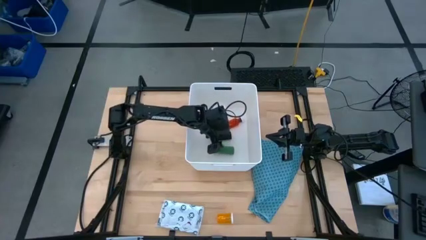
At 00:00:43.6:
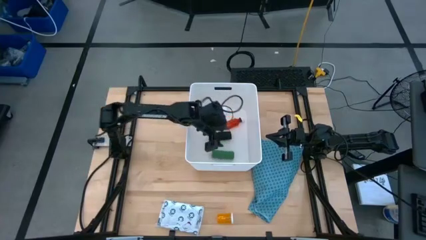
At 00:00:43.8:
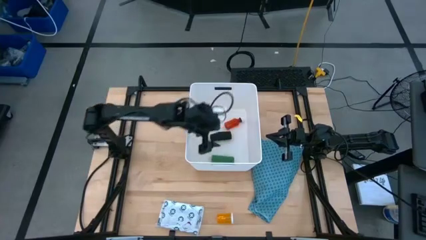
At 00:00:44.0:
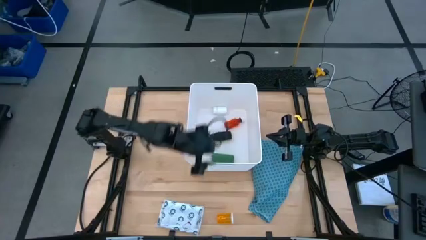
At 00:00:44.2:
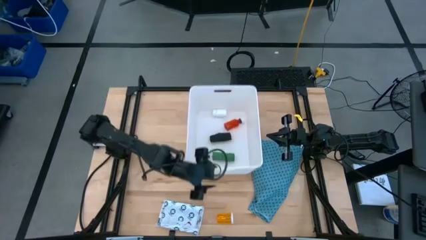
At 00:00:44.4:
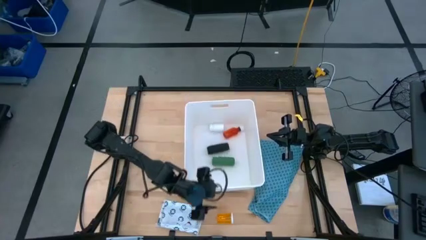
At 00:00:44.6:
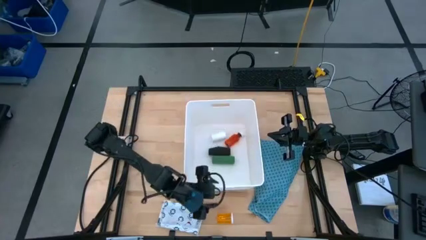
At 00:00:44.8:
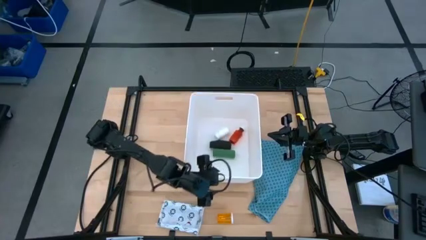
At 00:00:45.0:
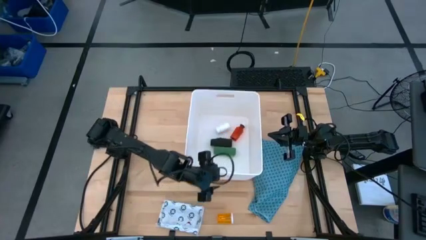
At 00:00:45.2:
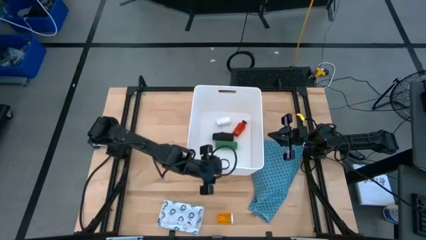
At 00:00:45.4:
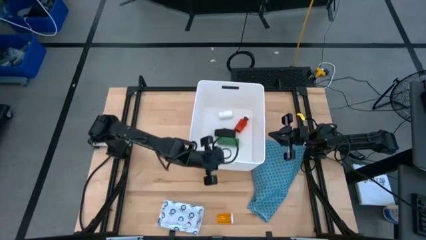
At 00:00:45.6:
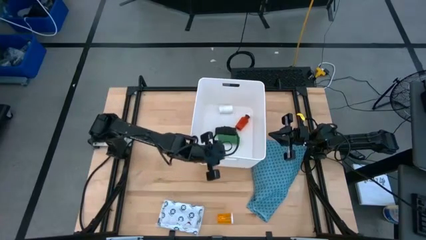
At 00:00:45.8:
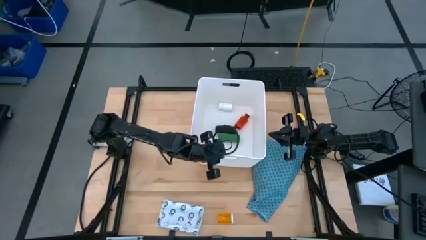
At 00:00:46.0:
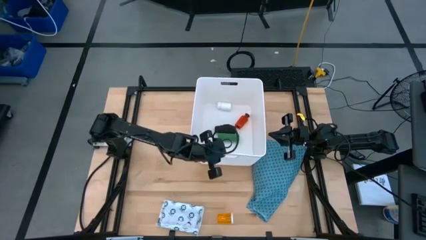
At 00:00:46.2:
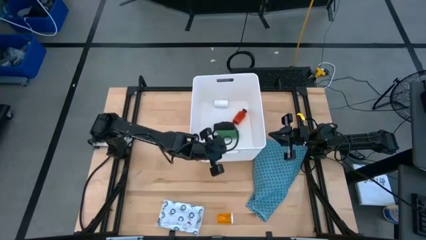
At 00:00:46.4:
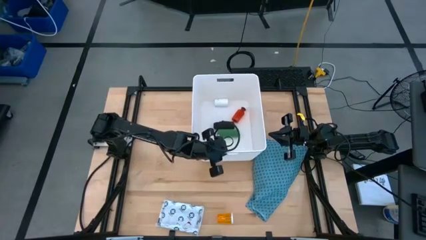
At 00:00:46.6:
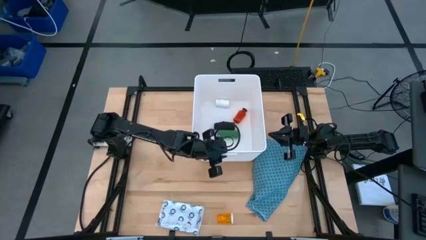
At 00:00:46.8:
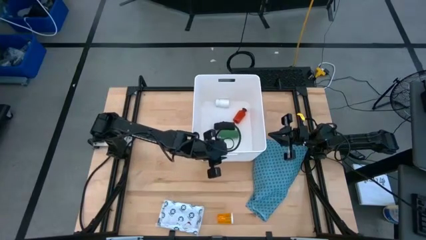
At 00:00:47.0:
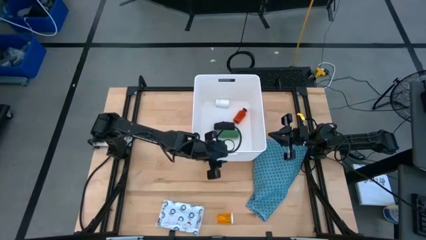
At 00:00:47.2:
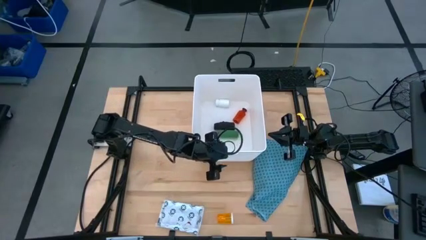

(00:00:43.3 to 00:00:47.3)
Task: Pick & place medical supplies in basket/bin
Adjust the white bin

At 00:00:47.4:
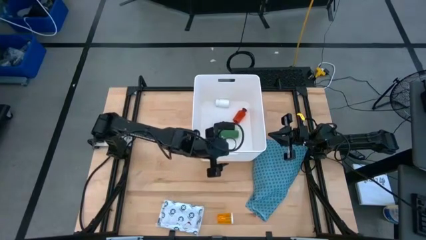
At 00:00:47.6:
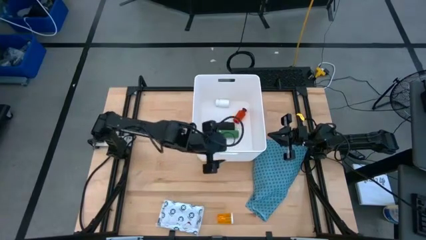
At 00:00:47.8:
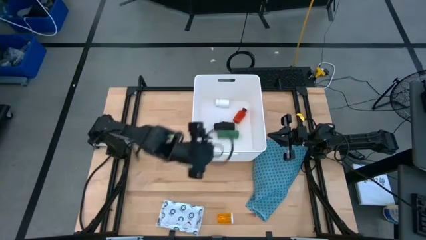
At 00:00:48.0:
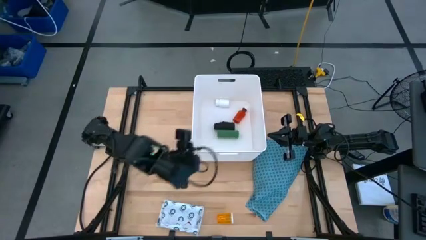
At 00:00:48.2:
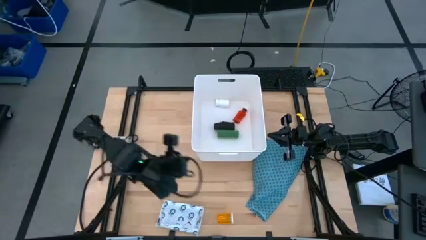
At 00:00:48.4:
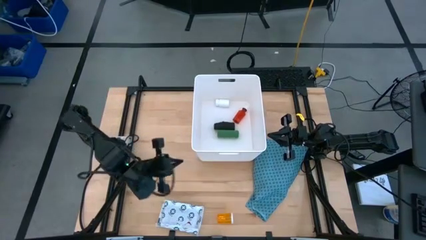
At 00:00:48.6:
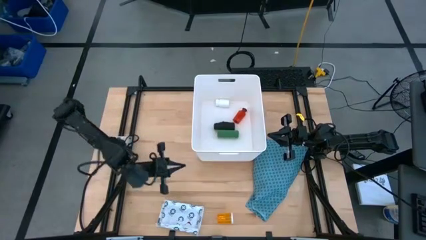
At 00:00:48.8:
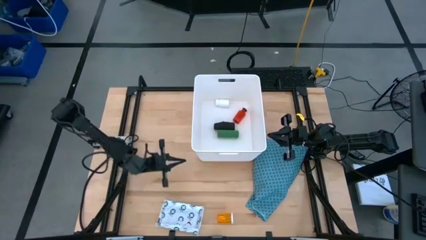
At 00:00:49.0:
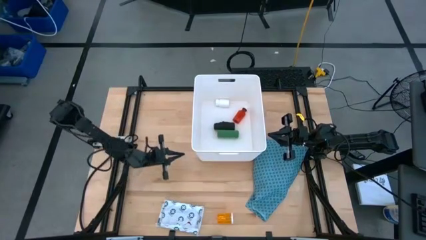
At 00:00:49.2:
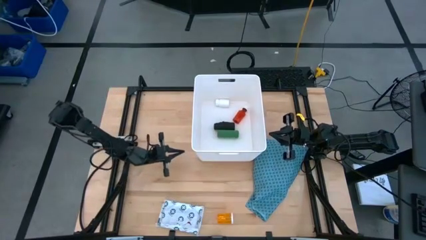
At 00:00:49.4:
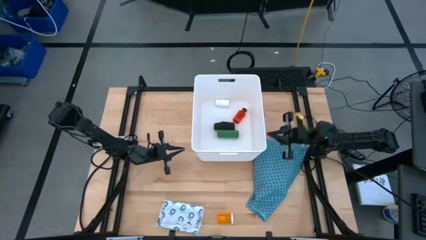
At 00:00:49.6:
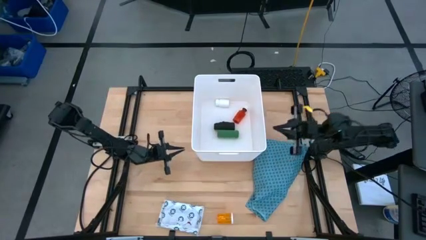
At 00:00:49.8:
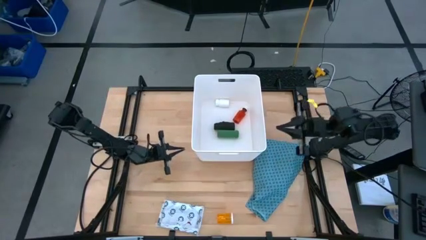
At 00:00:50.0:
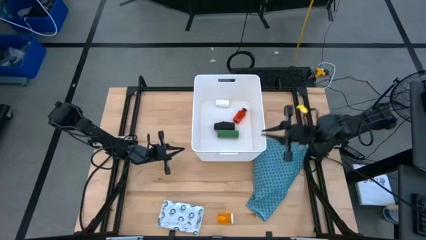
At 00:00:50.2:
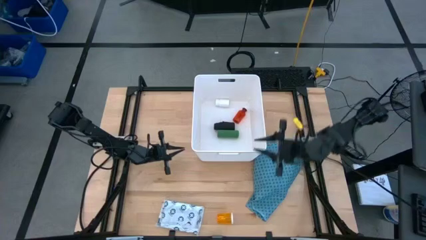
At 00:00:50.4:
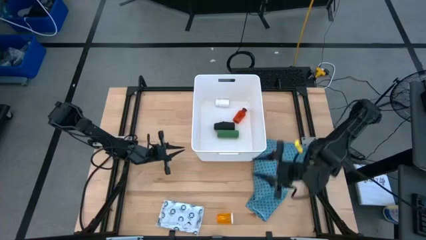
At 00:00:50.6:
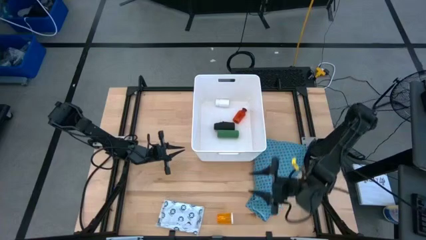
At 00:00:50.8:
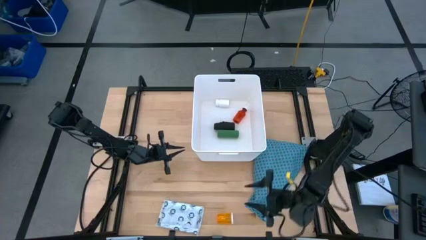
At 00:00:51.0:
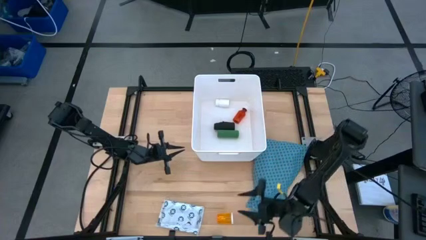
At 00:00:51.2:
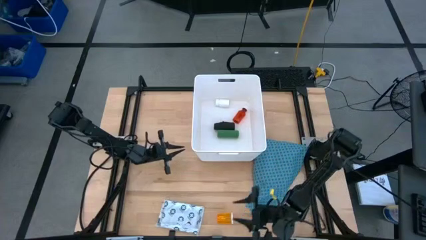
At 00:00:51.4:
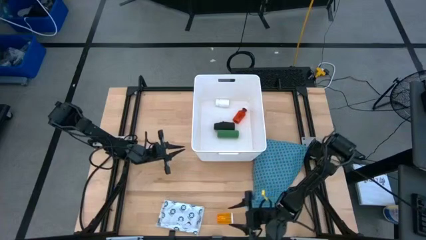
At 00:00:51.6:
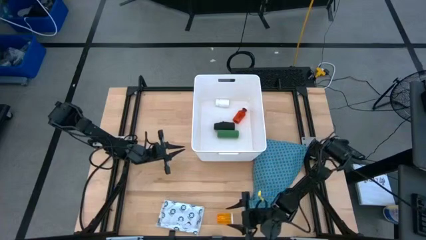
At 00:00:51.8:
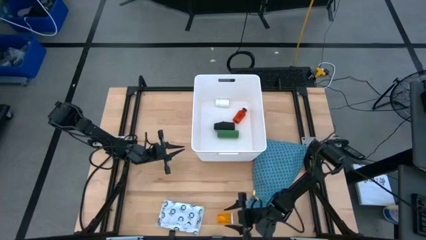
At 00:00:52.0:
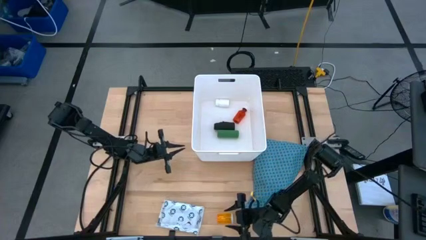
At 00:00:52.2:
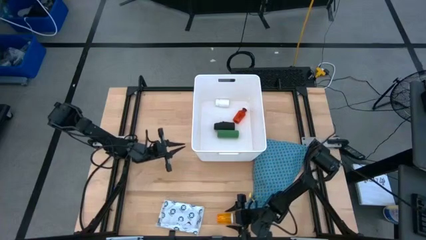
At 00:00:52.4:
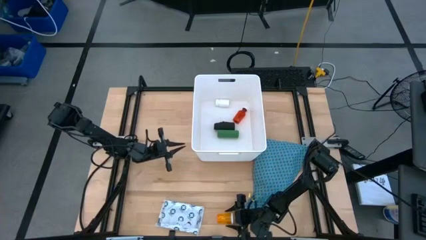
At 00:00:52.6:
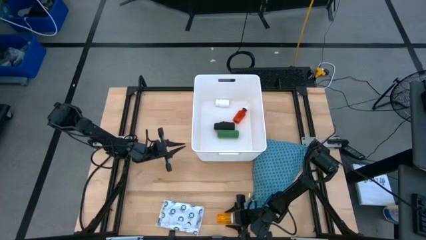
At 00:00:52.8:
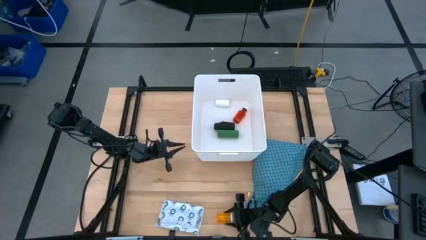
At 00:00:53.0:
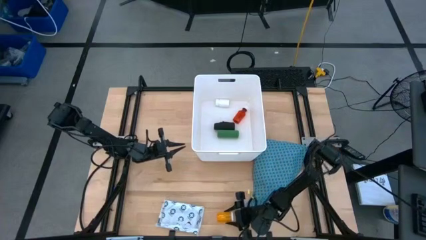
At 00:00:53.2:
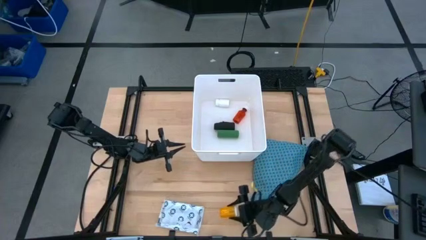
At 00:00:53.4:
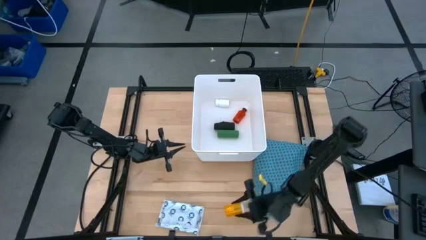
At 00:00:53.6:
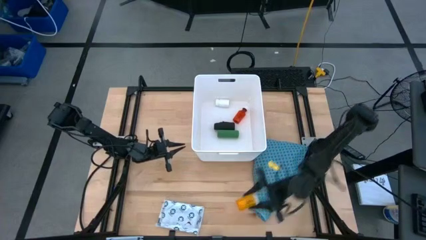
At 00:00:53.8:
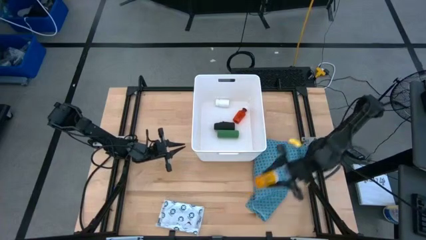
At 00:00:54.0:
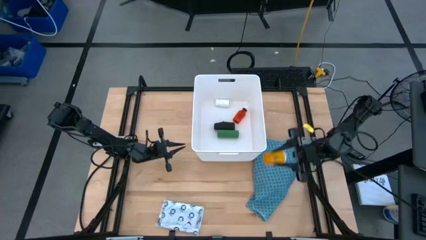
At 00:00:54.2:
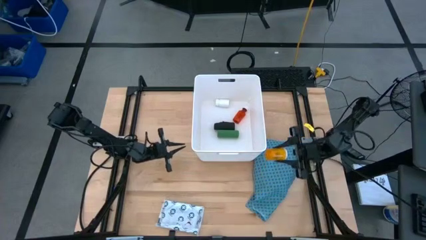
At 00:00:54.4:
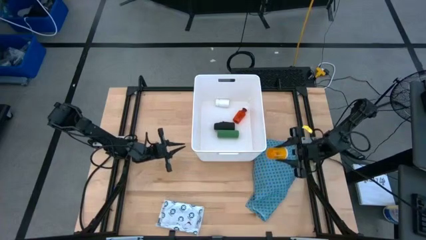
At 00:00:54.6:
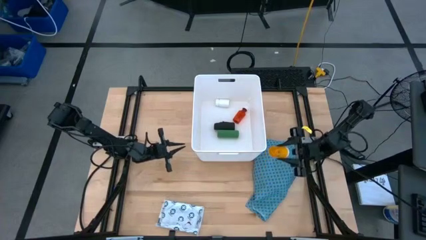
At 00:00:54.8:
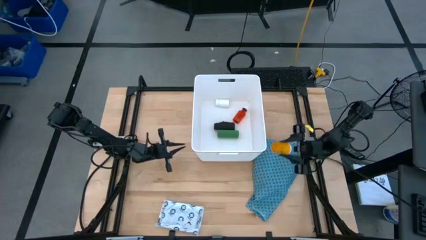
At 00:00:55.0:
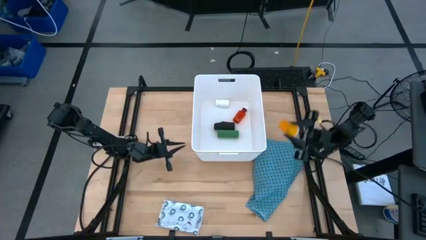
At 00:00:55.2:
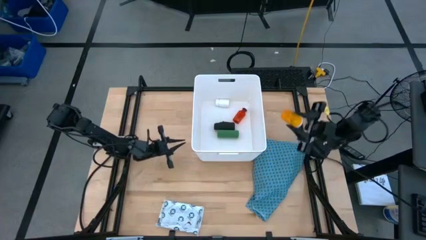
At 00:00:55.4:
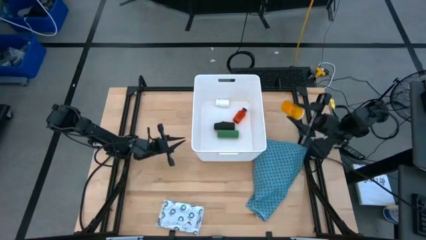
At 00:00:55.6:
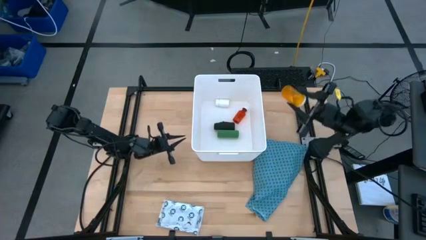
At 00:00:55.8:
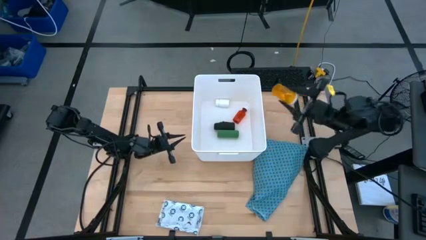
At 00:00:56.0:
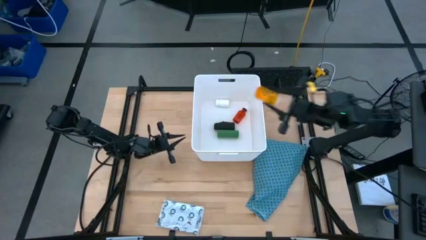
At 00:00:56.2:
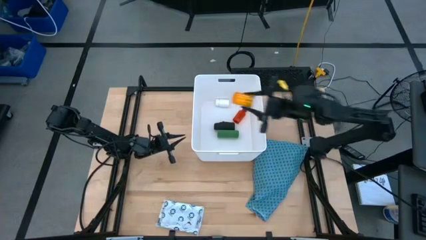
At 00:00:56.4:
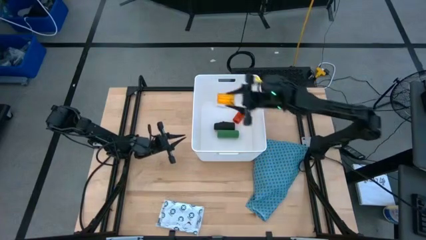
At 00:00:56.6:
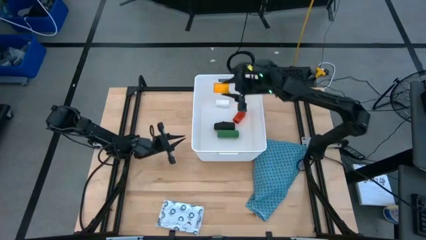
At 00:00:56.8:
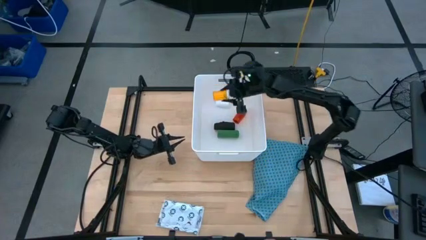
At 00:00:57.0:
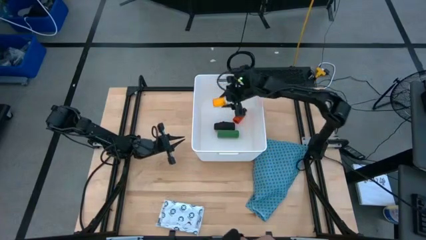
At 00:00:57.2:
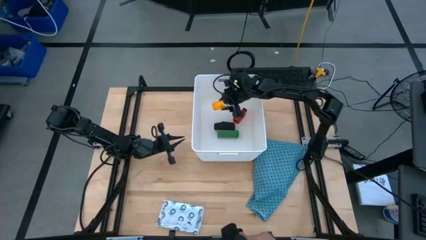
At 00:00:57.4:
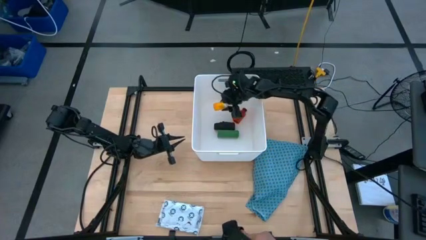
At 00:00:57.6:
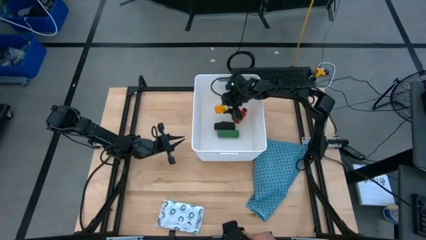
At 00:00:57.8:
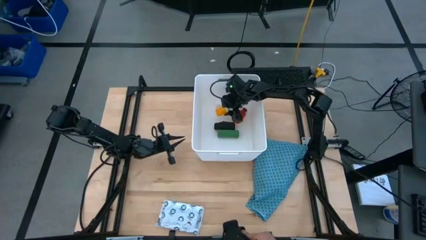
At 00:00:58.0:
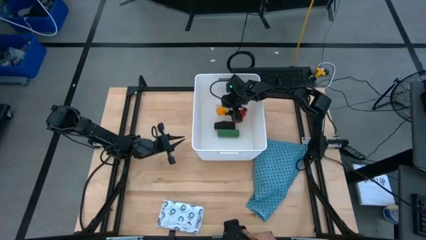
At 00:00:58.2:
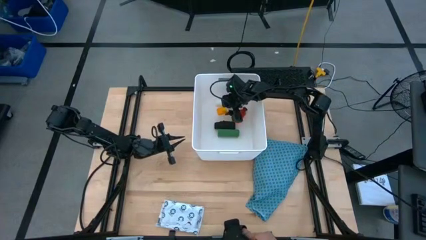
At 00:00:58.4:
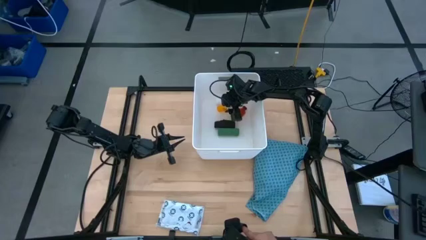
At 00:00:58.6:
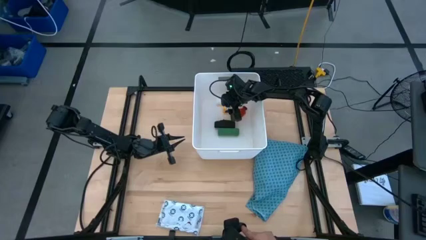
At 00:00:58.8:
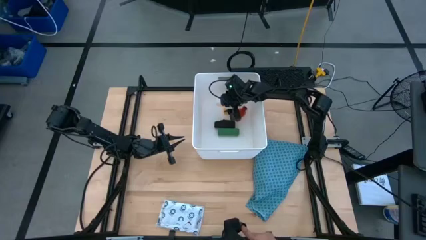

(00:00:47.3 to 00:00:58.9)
Put the orange bottle into the white bin
